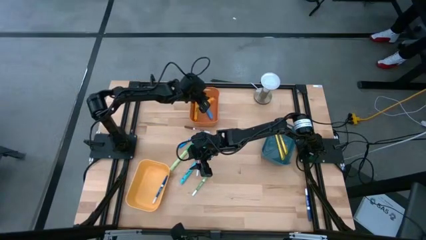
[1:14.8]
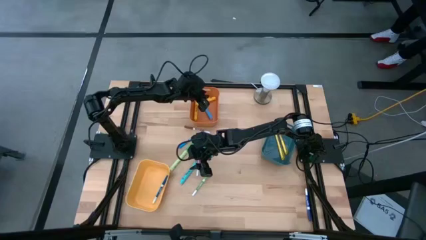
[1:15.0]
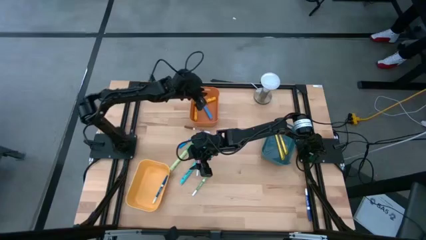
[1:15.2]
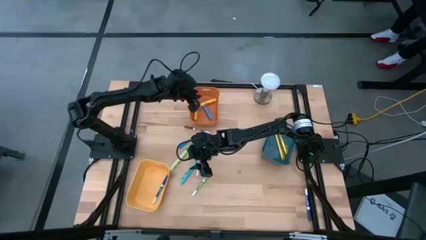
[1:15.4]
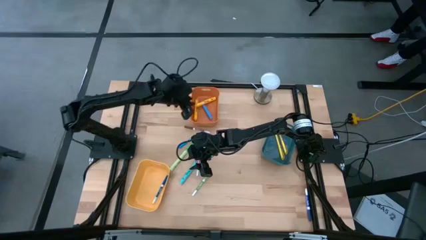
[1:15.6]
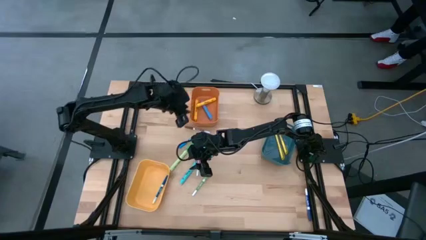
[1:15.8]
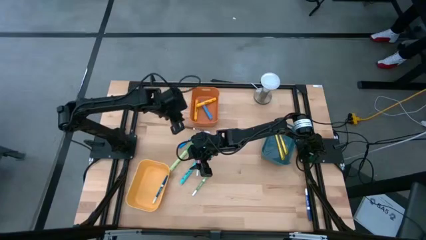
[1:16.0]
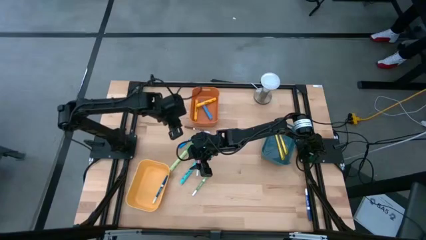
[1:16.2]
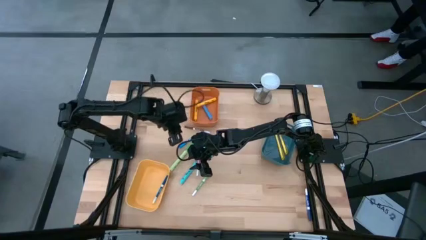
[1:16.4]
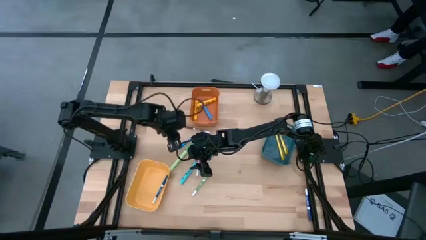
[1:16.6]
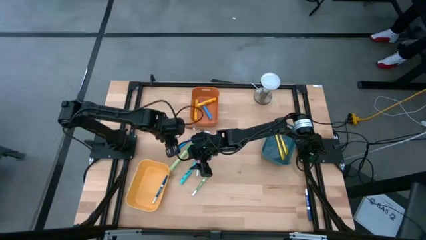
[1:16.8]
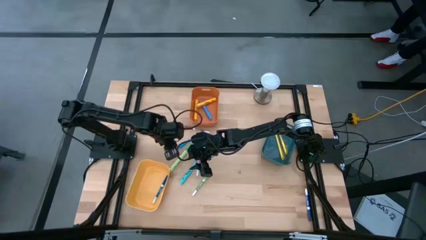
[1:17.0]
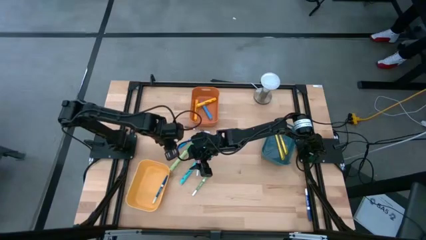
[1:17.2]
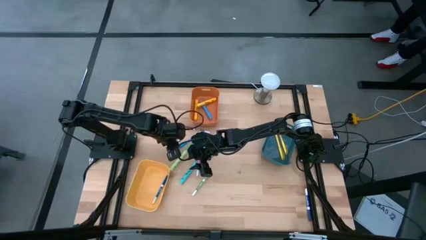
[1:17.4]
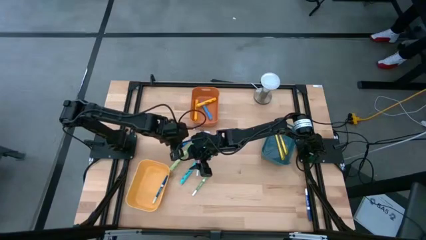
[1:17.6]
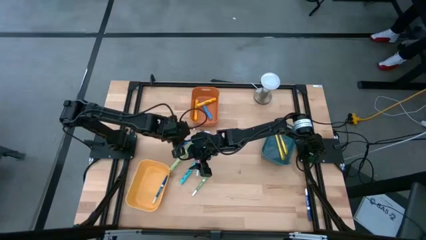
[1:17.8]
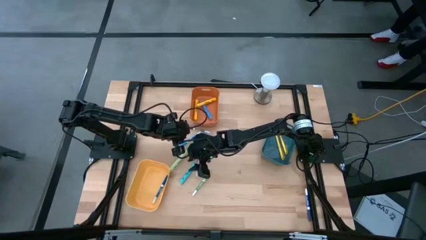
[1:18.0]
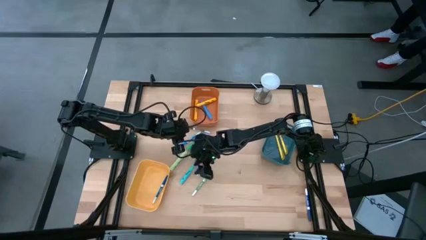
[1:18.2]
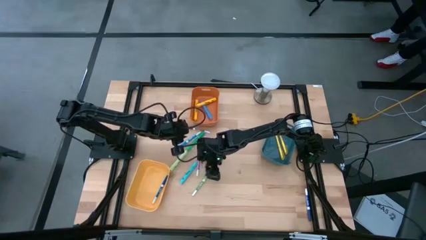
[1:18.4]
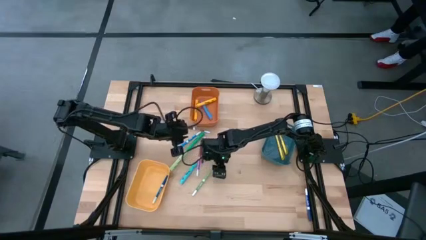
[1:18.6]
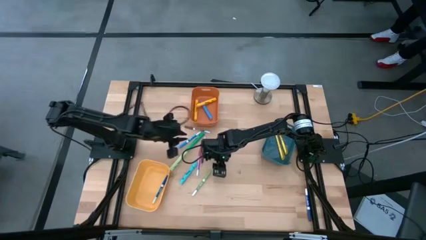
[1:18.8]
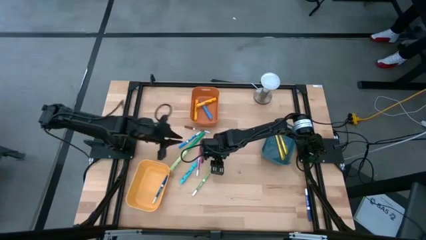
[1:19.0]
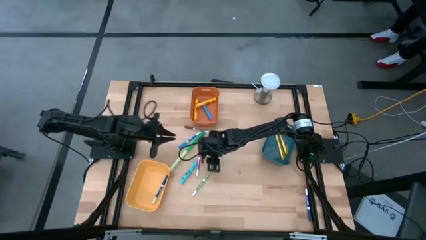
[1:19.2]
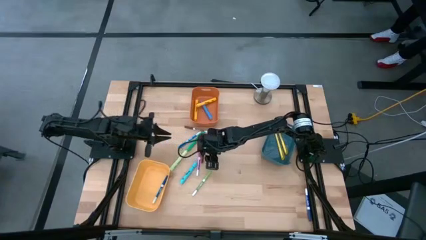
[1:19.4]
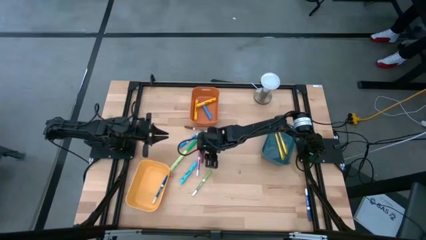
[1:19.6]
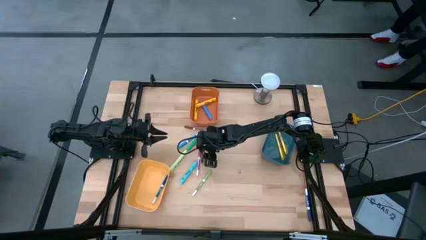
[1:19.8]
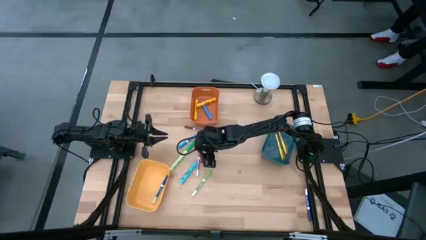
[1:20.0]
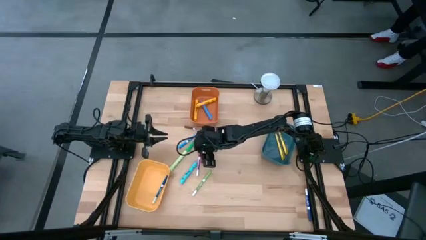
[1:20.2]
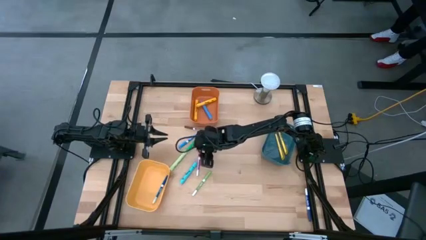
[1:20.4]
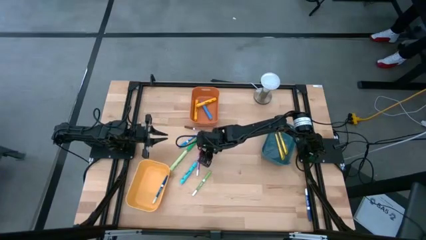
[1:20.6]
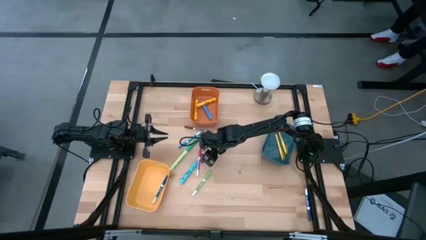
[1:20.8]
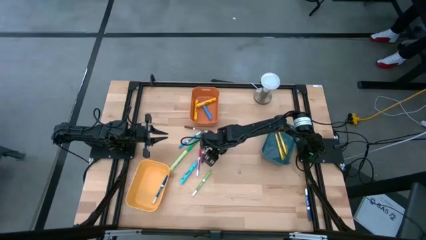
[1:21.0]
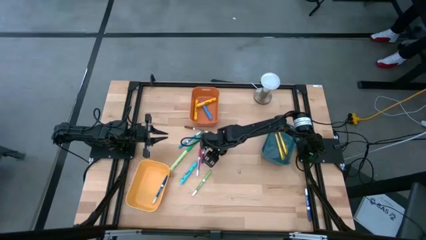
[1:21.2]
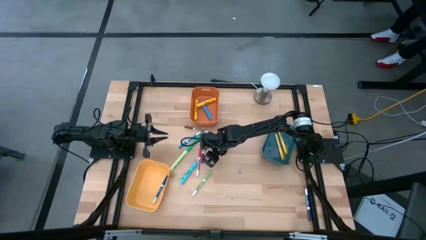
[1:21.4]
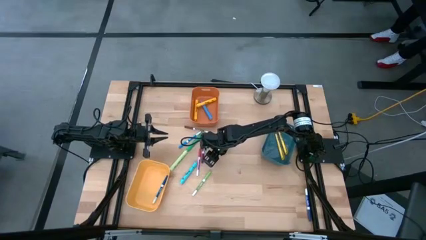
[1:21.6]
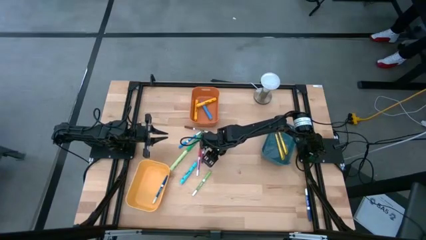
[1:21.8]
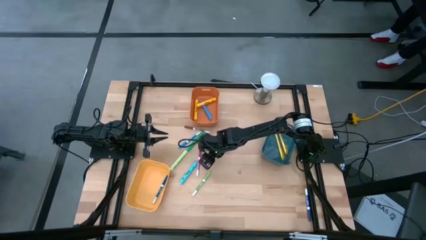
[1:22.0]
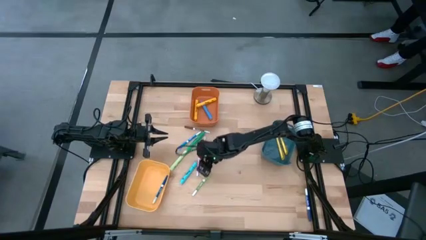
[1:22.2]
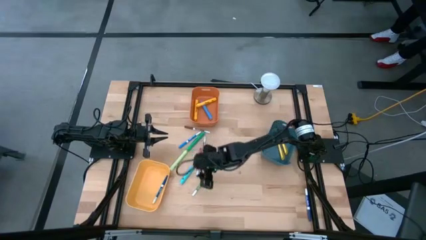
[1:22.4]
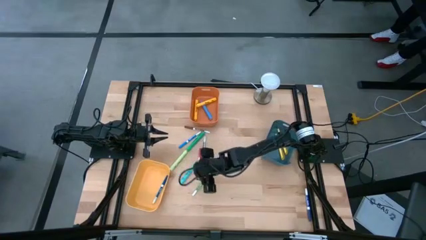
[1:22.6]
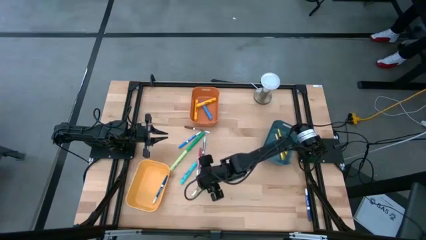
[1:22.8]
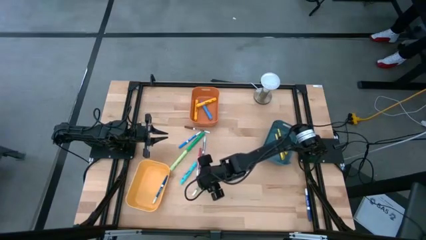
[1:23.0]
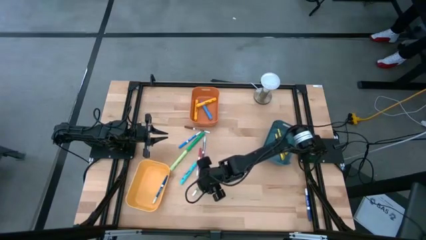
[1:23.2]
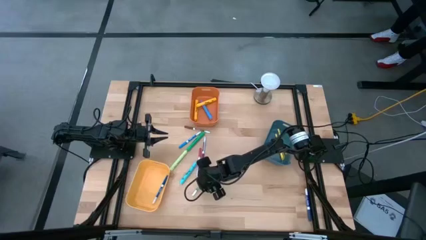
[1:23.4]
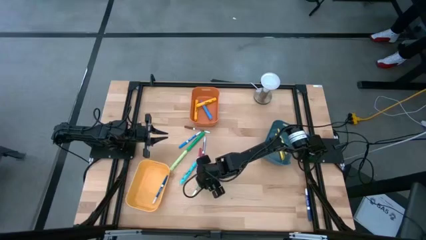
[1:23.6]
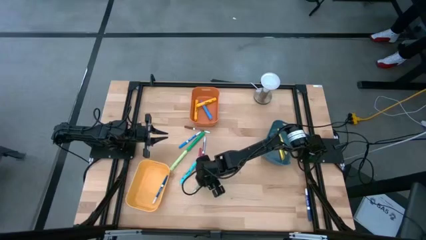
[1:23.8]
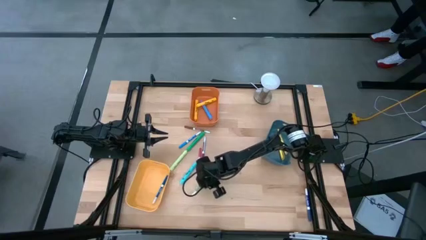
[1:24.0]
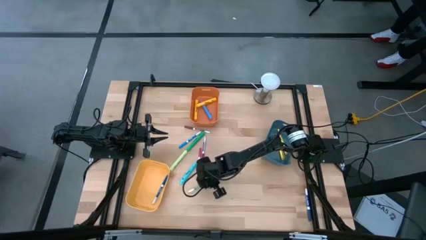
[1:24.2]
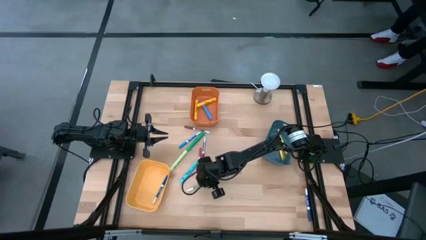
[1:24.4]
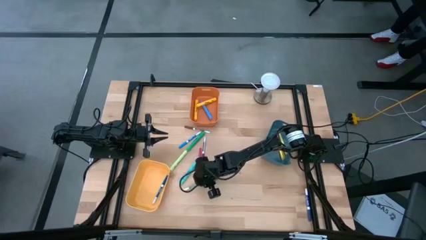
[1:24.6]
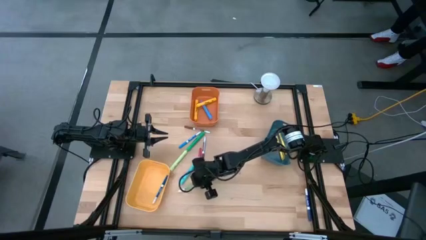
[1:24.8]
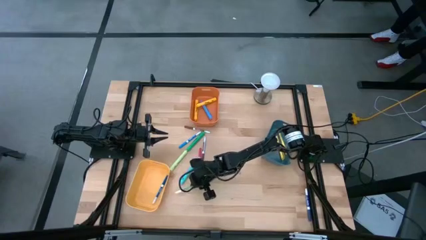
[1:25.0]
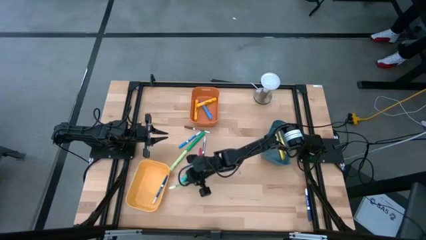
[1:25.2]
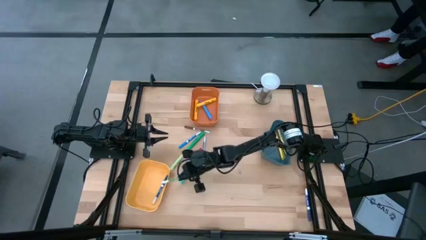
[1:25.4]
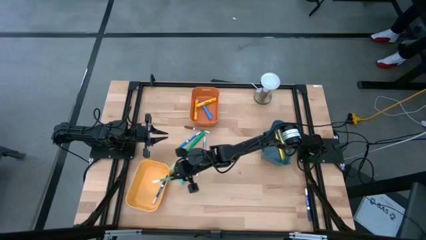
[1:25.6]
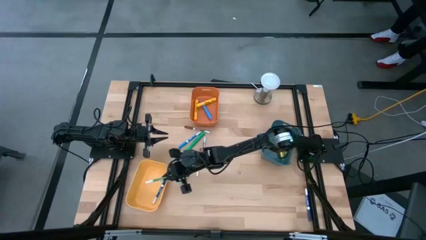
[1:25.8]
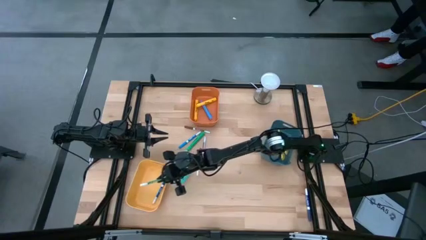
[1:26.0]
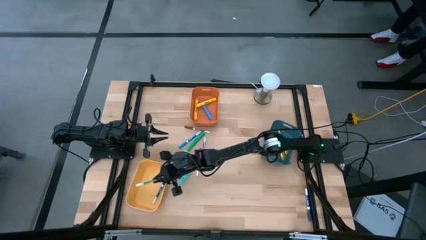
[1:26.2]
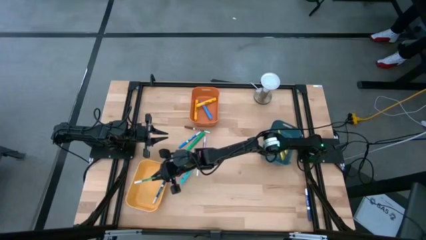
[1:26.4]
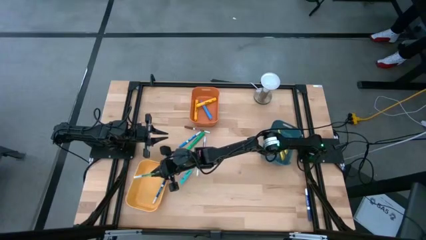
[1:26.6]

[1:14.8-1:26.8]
Task: Pick & Place Markers
Put the green marker pen into the yellow bin
